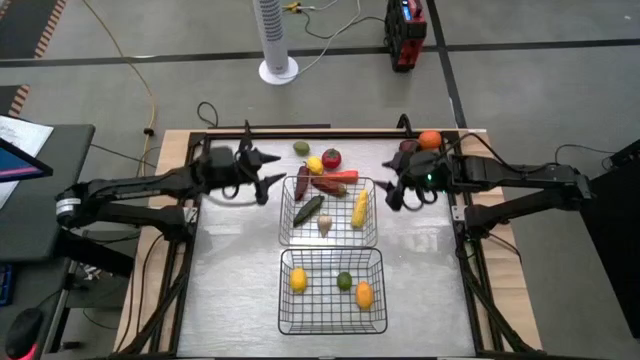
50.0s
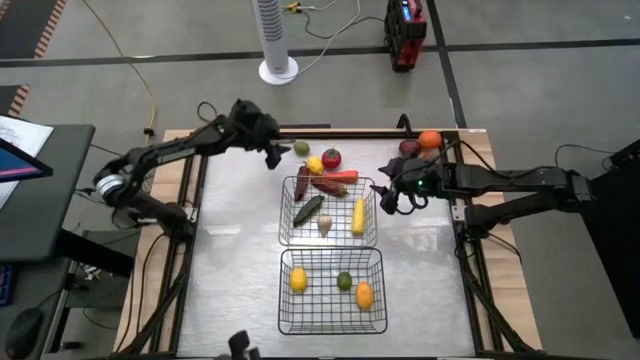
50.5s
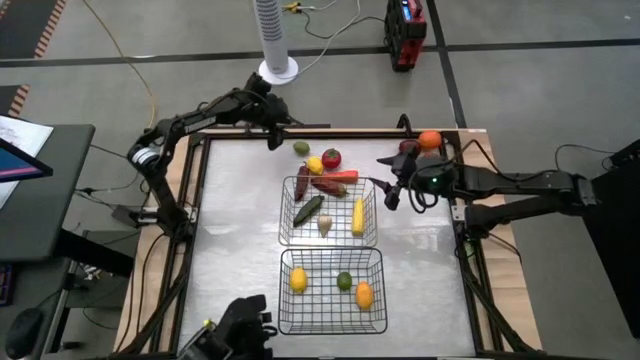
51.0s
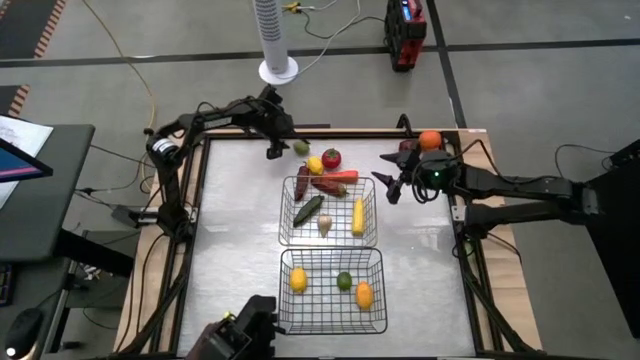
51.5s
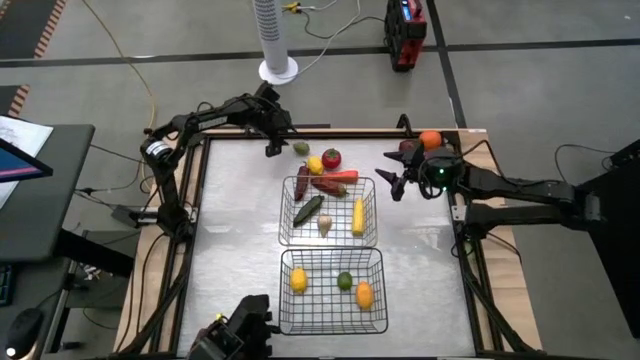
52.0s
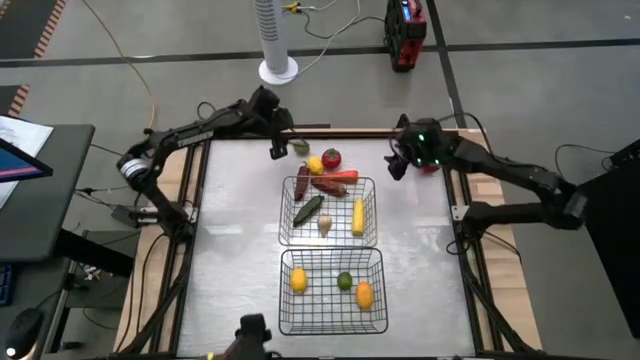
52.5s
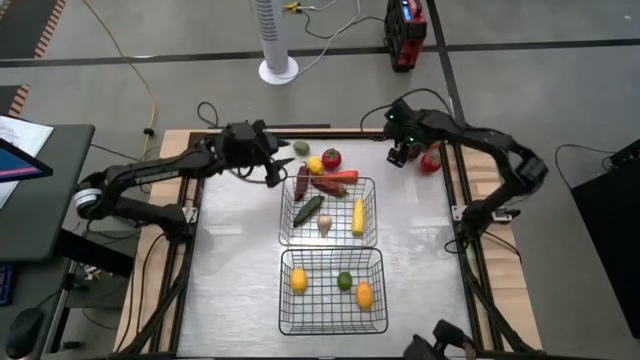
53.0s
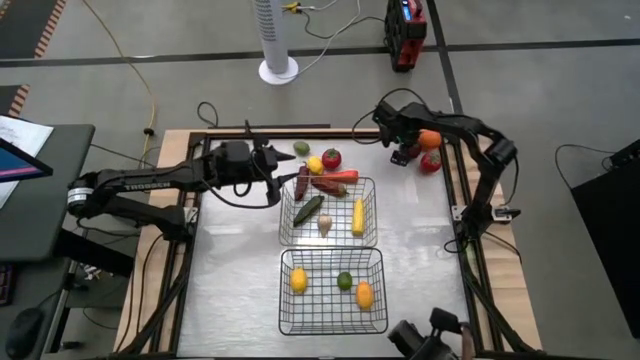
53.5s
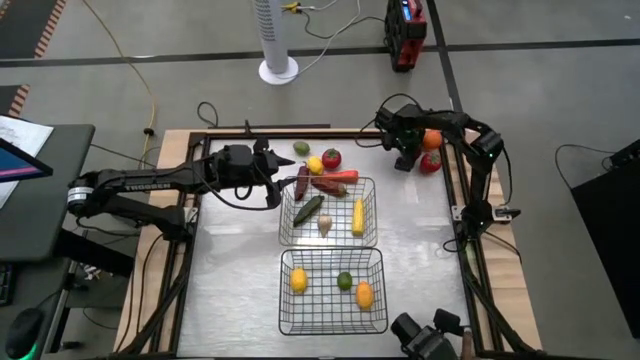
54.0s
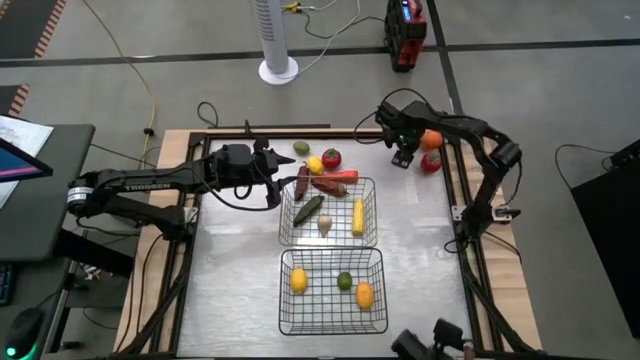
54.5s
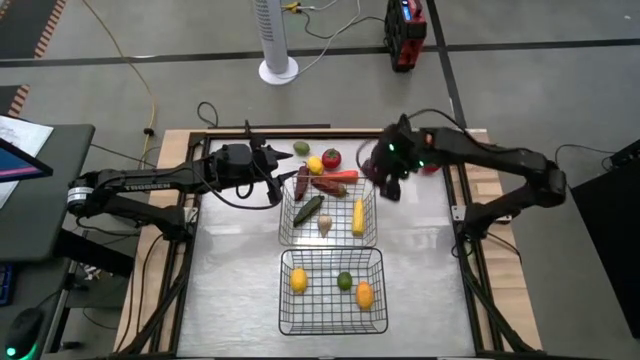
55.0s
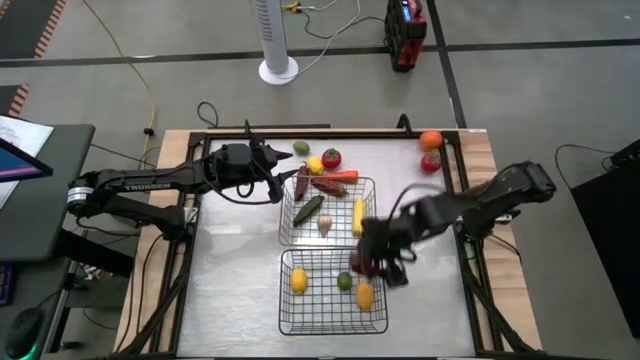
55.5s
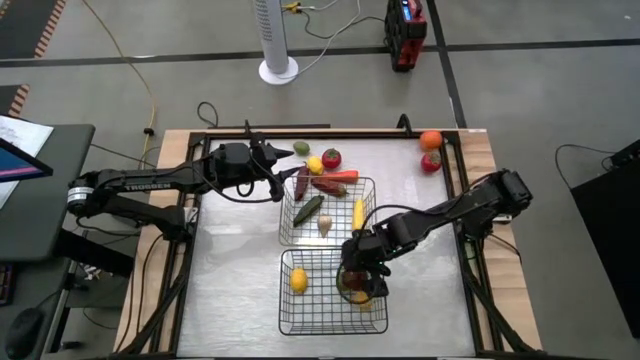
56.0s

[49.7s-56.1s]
Task: Sort produce into baskets
Put the apple into the bottom wire basket

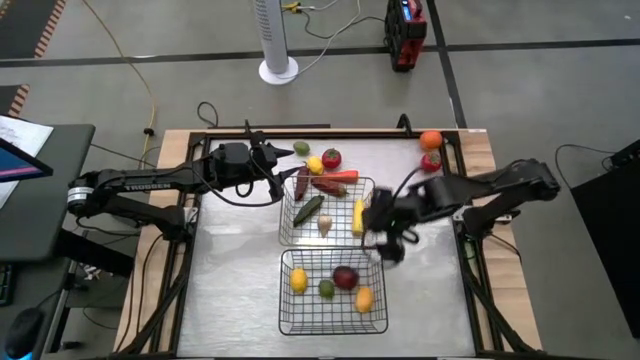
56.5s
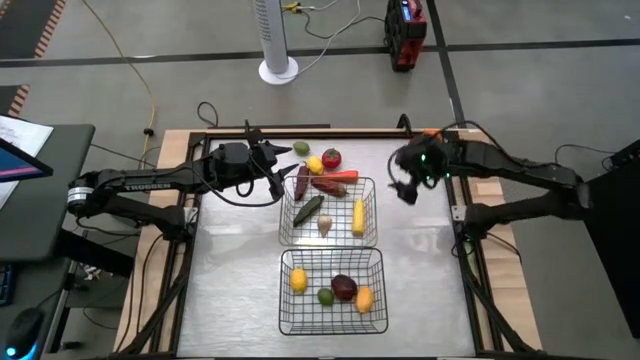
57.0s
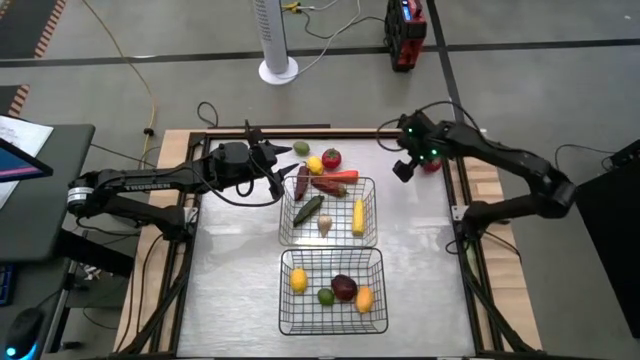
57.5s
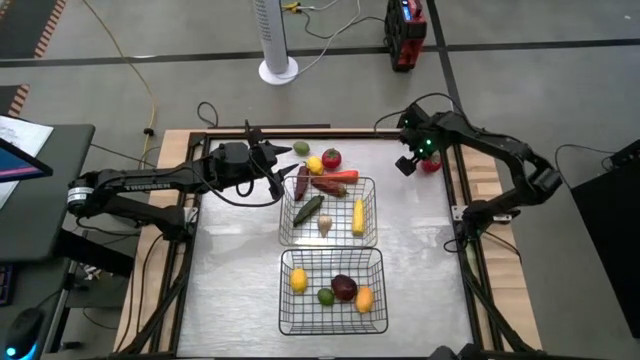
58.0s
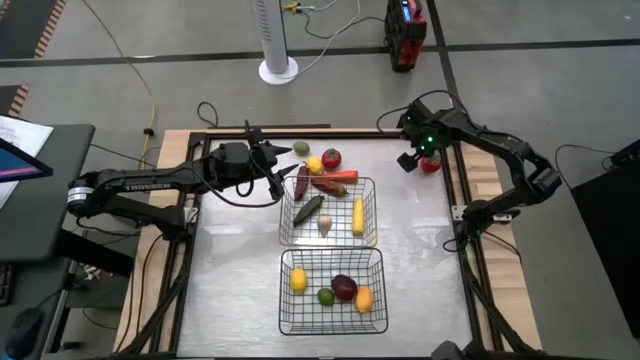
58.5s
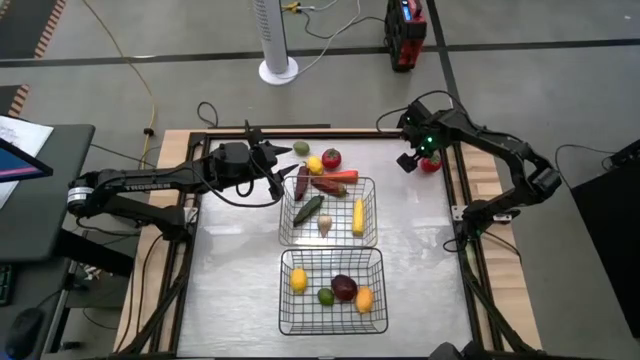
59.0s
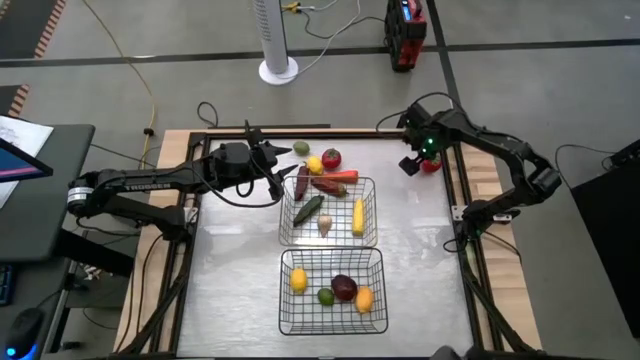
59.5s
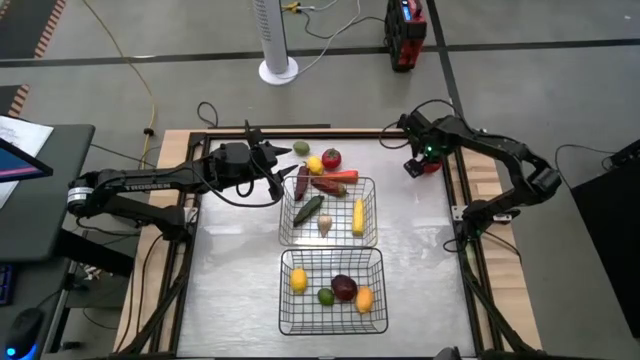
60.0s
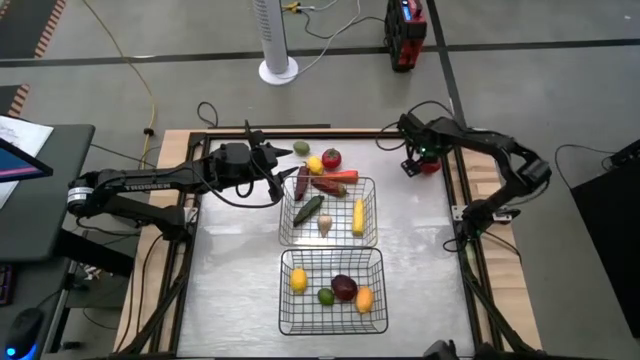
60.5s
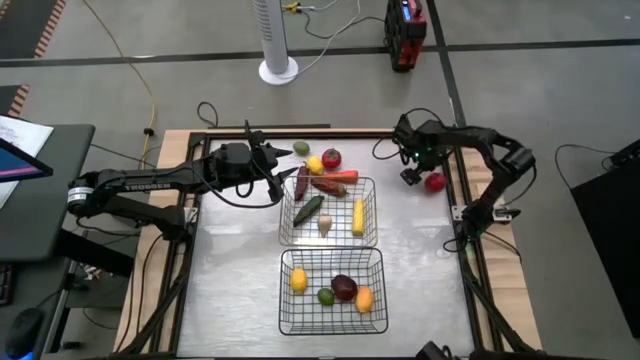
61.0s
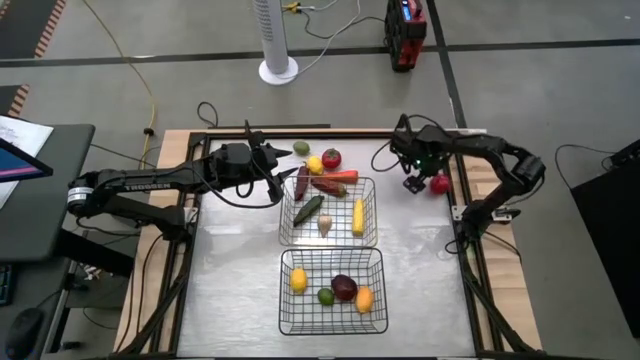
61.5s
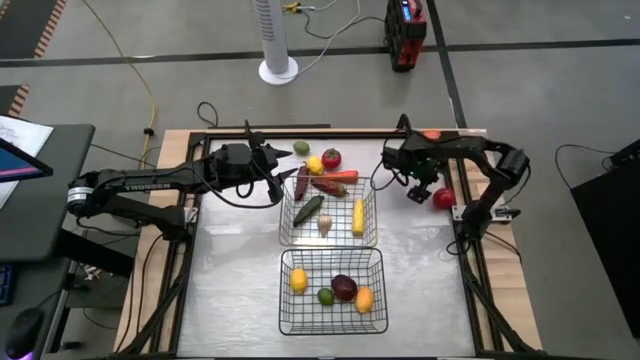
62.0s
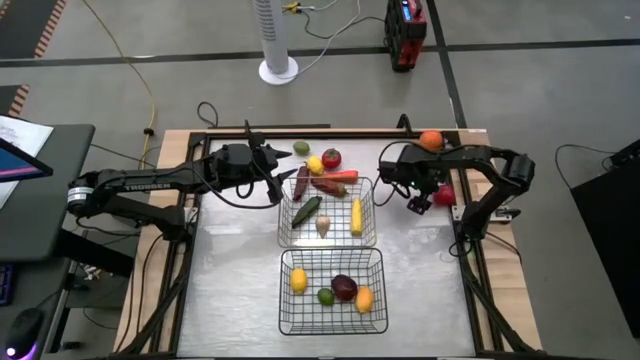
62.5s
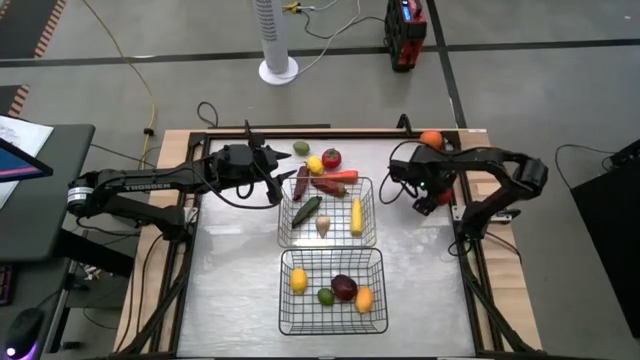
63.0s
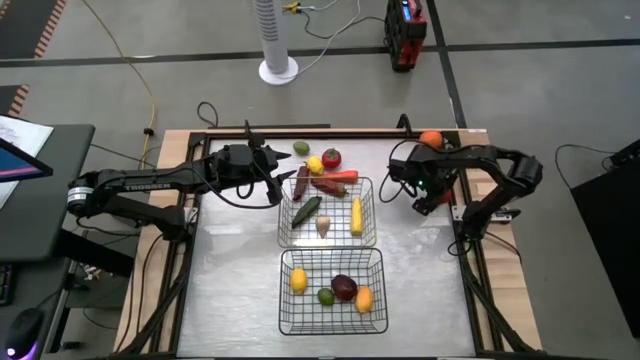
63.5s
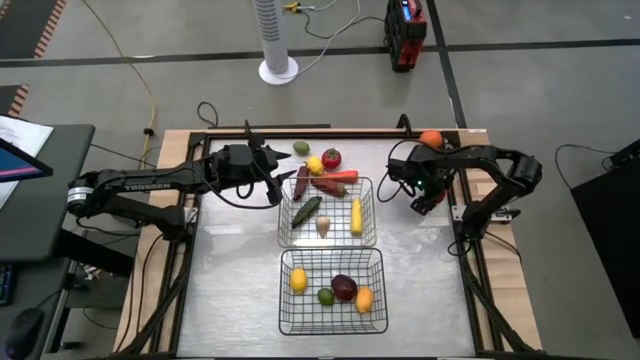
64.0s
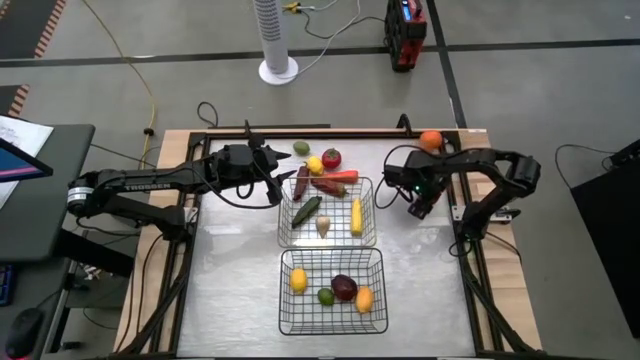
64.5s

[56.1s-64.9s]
Put the tomato into the bottom wire basket

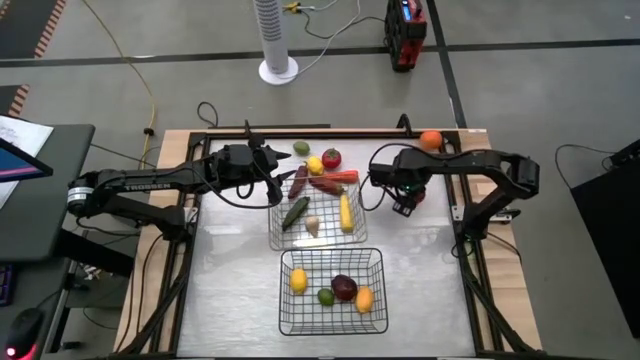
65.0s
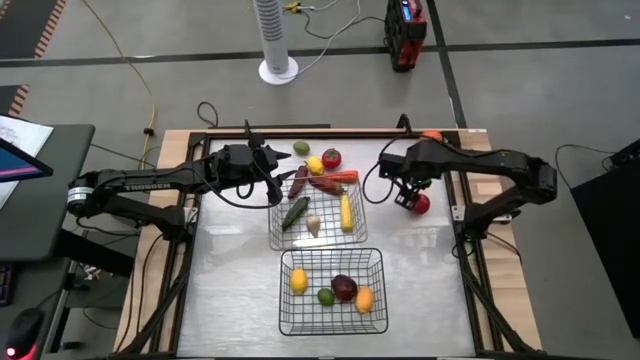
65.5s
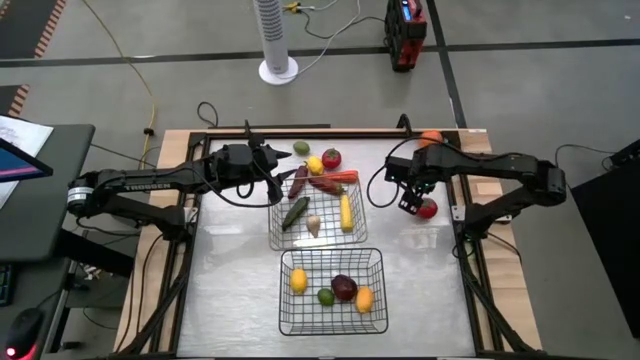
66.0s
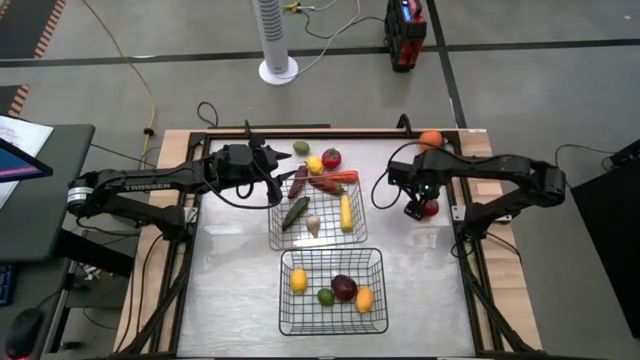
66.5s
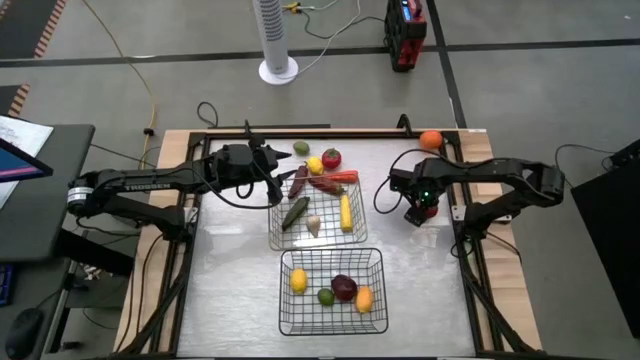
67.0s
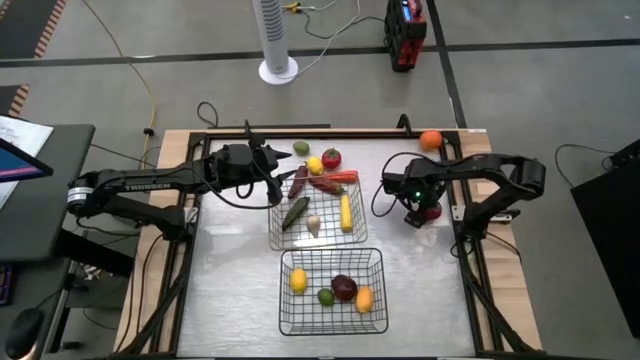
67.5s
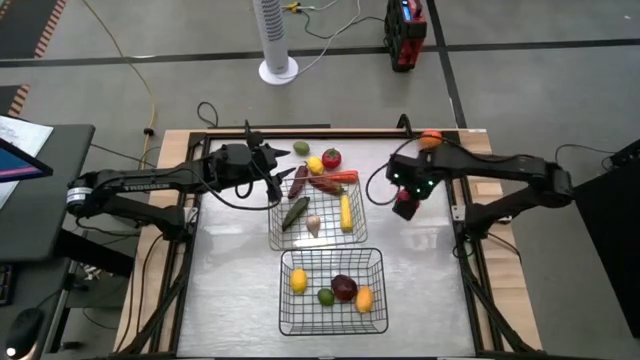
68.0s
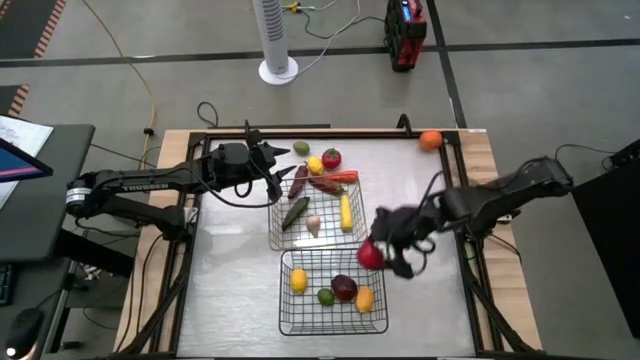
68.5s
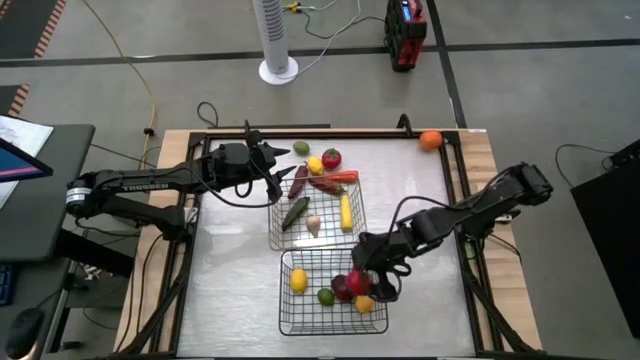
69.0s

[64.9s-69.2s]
Put the tomato into the bottom wire basket

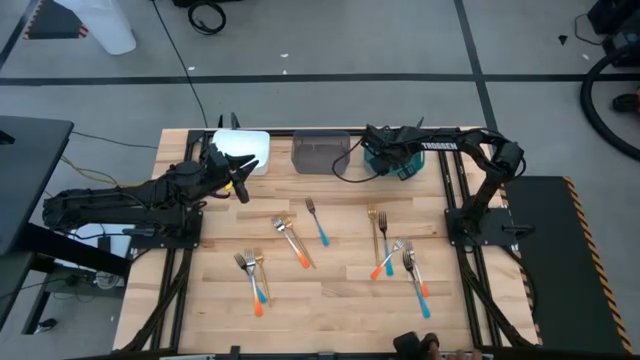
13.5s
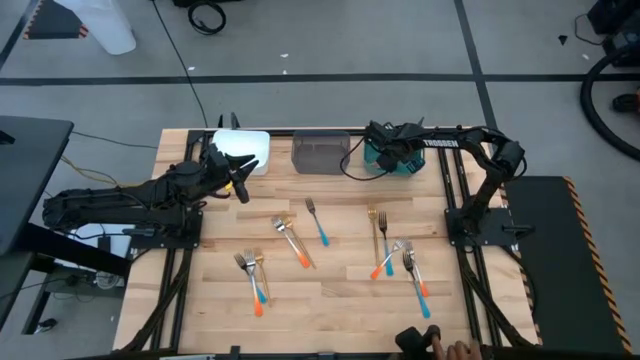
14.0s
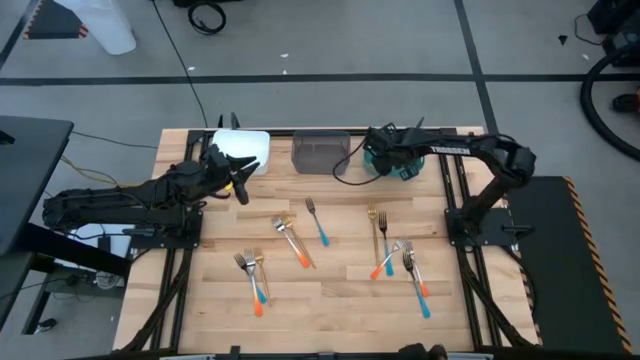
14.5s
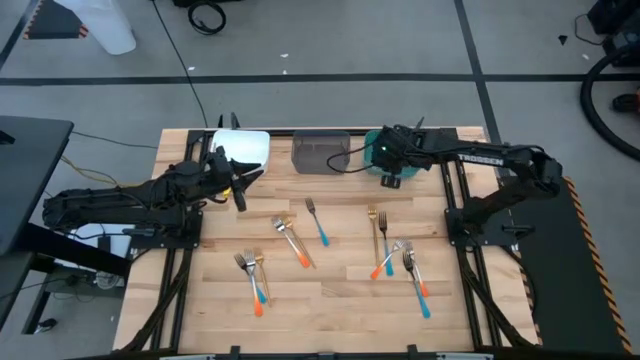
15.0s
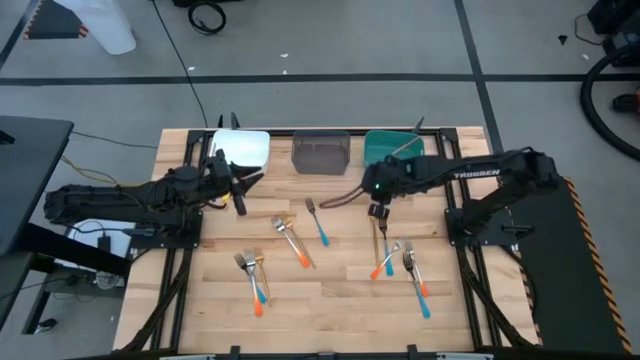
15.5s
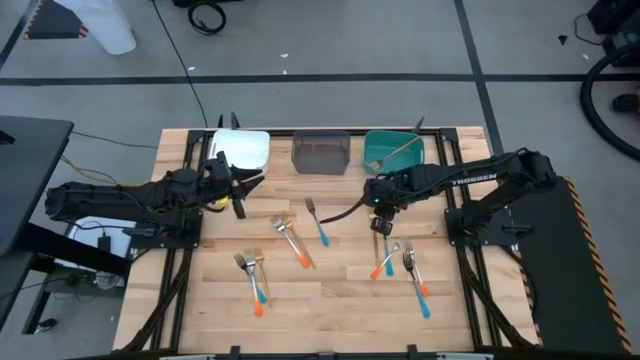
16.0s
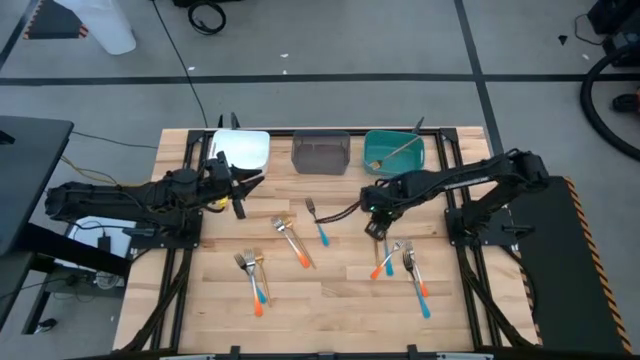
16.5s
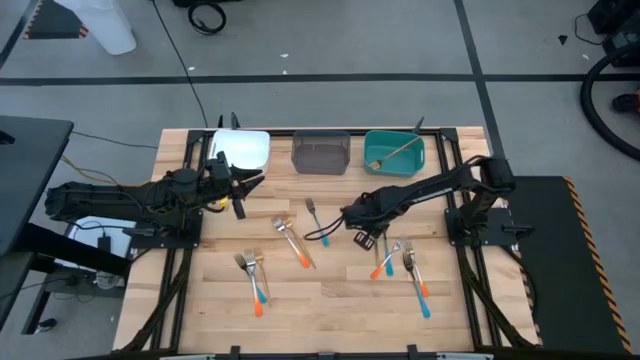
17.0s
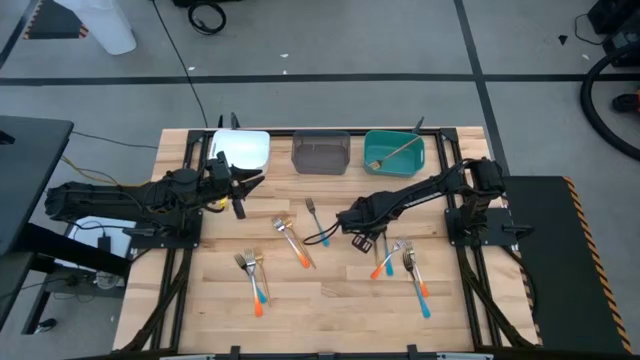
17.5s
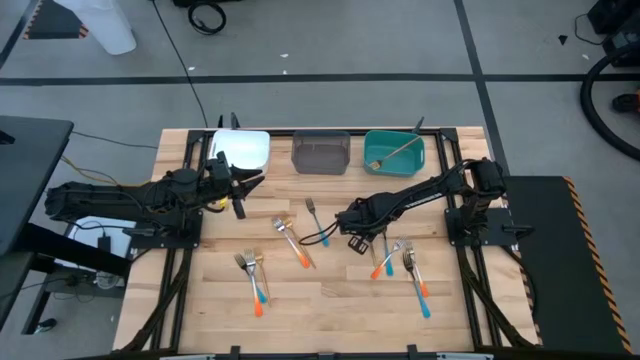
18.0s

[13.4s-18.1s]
Task: Sort silverware by color (type)
Put the gold fork into the green bin
